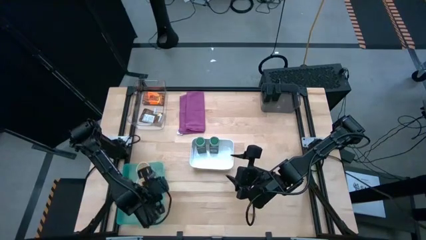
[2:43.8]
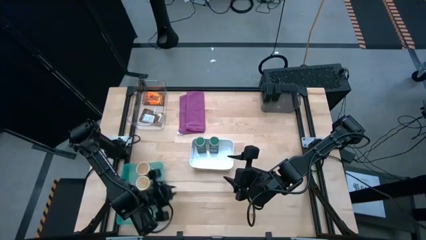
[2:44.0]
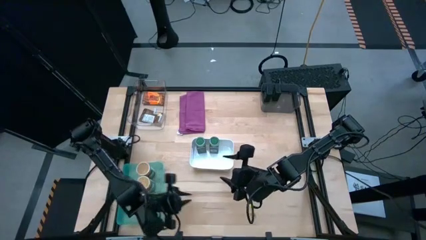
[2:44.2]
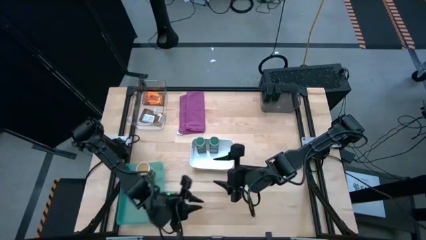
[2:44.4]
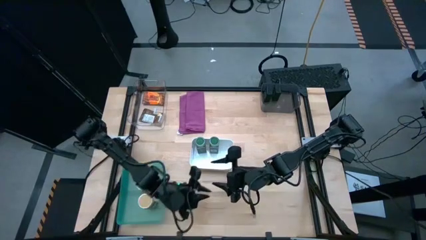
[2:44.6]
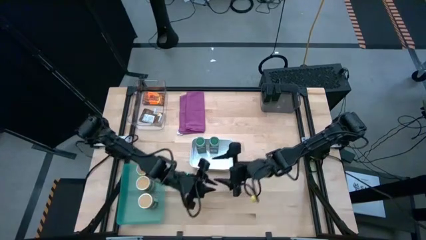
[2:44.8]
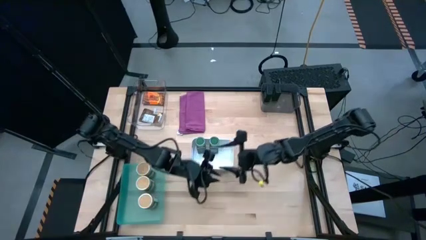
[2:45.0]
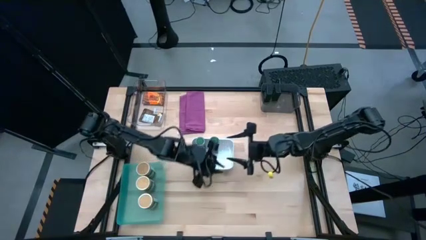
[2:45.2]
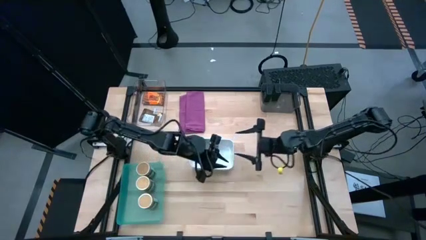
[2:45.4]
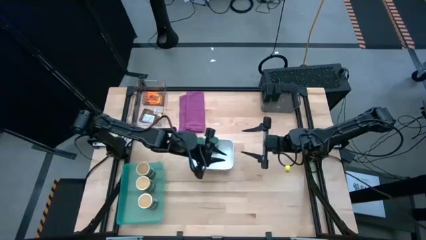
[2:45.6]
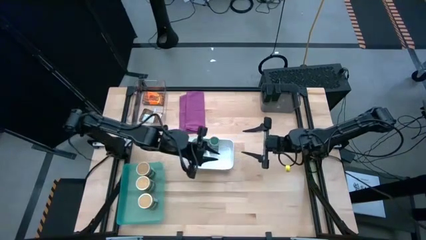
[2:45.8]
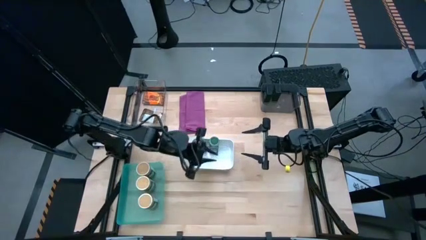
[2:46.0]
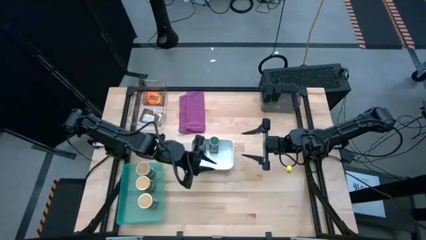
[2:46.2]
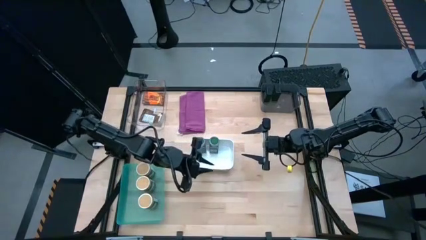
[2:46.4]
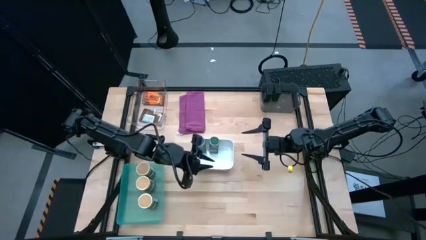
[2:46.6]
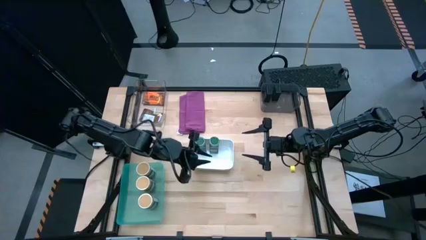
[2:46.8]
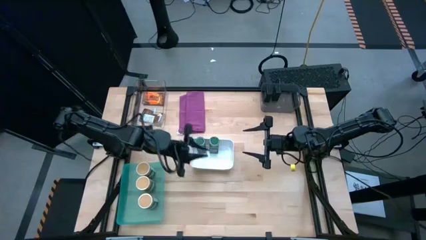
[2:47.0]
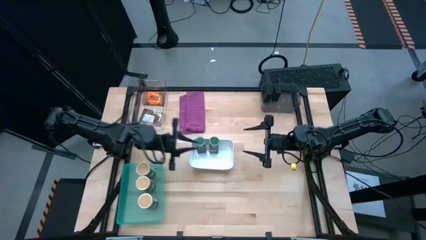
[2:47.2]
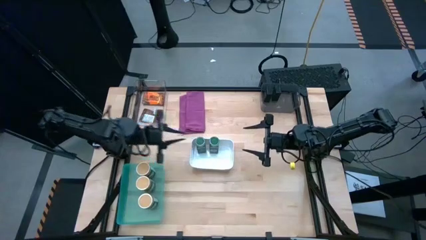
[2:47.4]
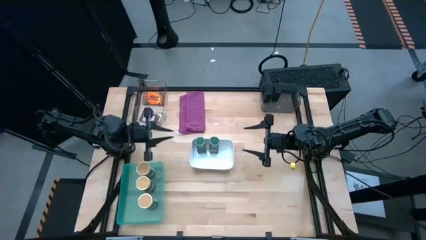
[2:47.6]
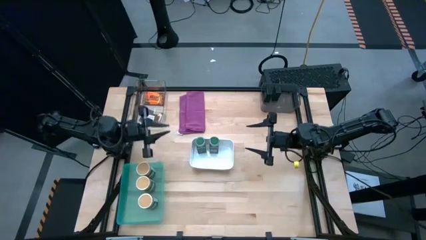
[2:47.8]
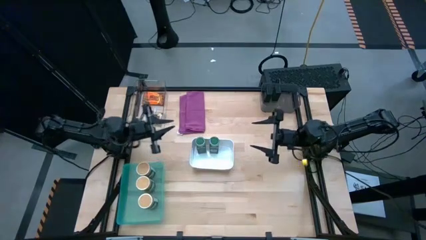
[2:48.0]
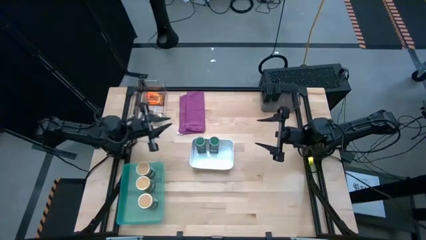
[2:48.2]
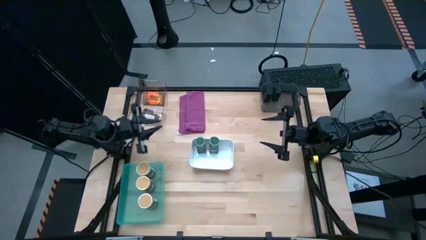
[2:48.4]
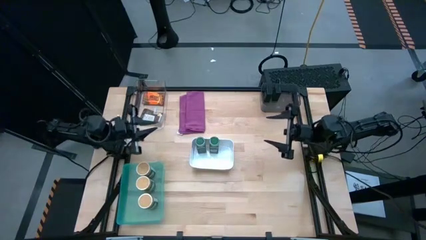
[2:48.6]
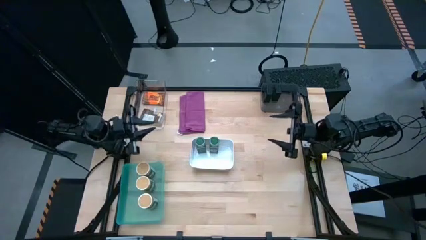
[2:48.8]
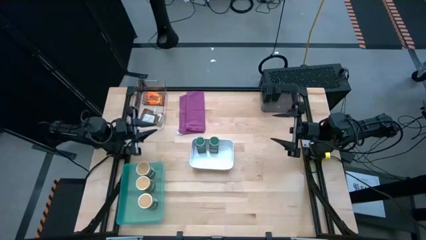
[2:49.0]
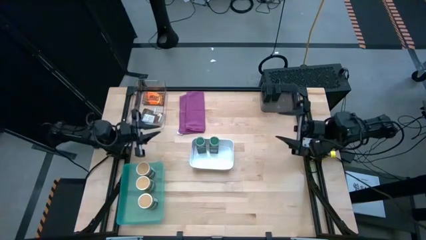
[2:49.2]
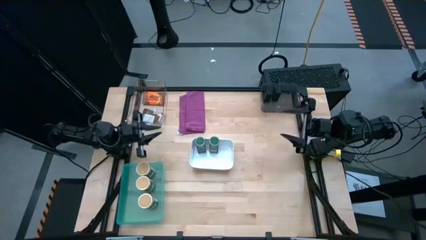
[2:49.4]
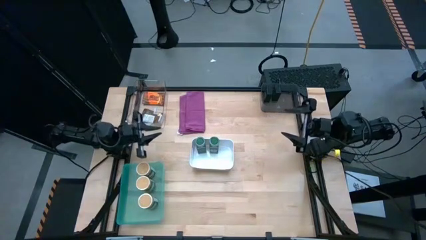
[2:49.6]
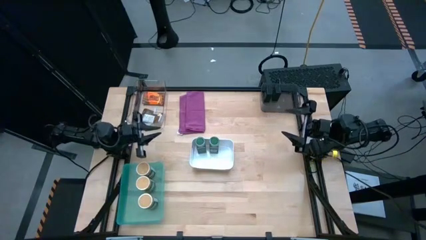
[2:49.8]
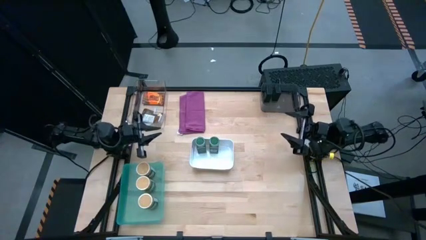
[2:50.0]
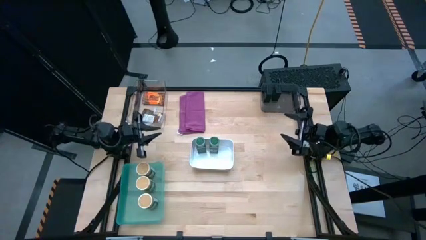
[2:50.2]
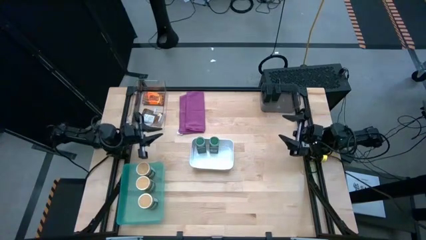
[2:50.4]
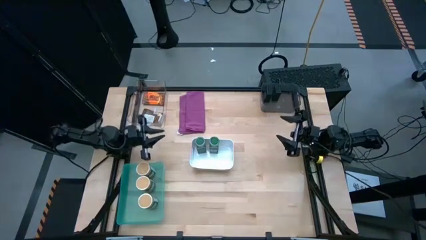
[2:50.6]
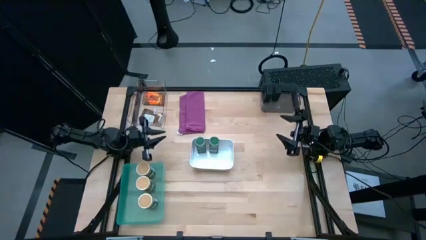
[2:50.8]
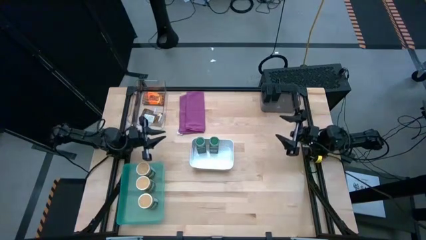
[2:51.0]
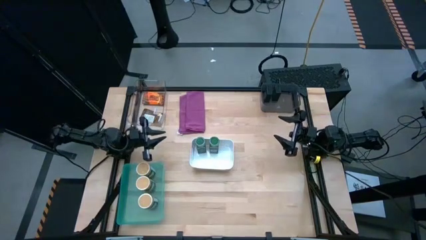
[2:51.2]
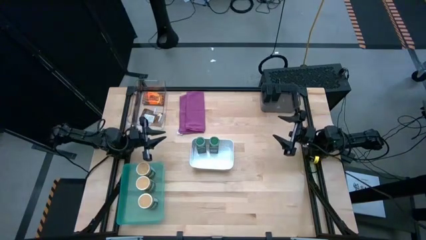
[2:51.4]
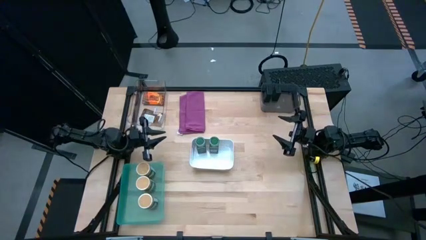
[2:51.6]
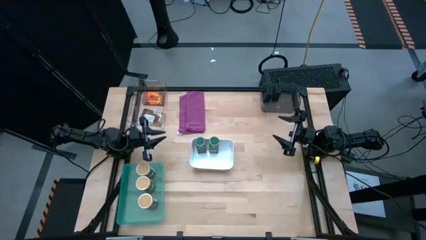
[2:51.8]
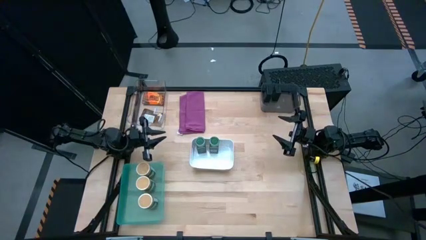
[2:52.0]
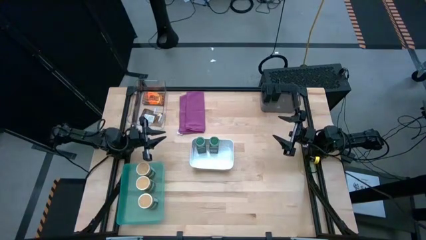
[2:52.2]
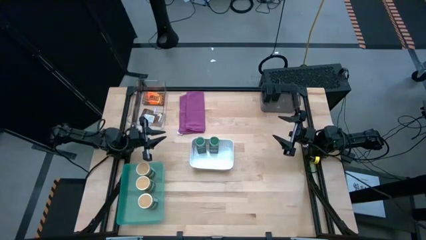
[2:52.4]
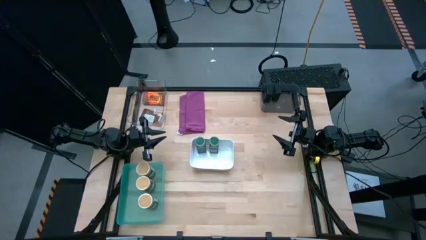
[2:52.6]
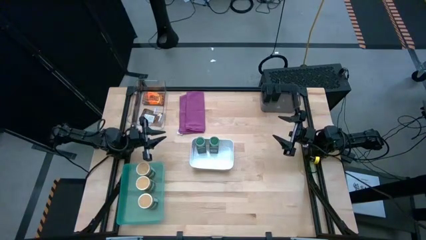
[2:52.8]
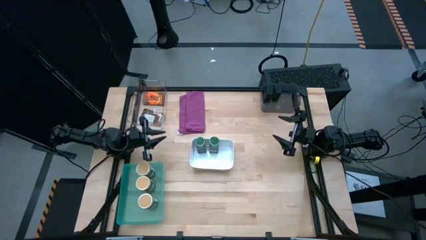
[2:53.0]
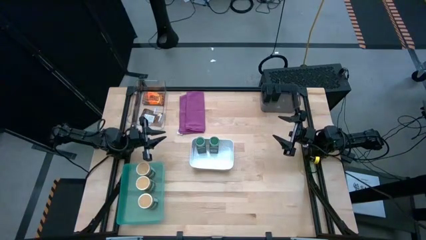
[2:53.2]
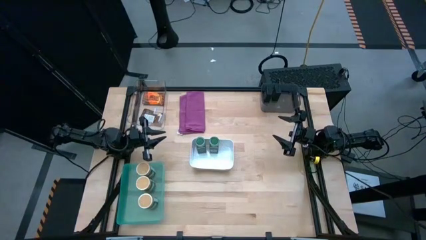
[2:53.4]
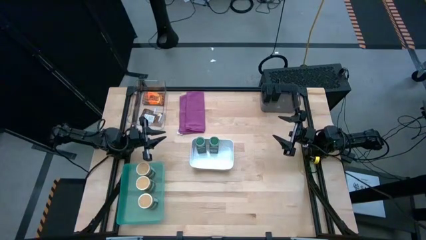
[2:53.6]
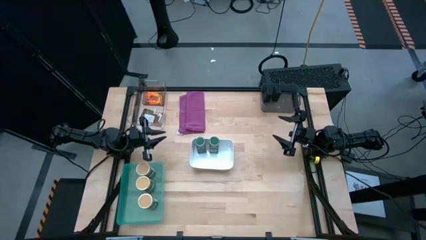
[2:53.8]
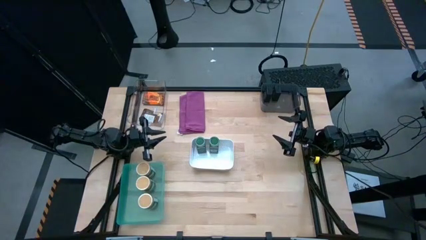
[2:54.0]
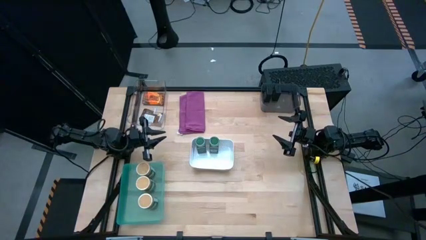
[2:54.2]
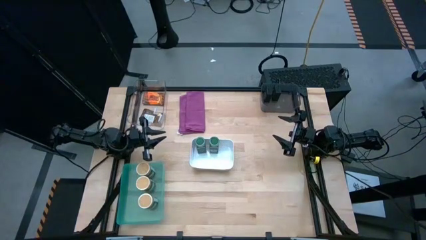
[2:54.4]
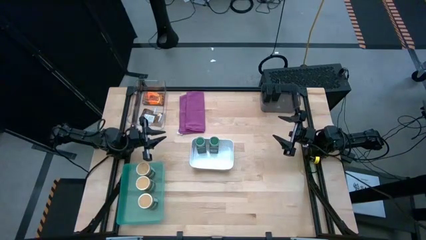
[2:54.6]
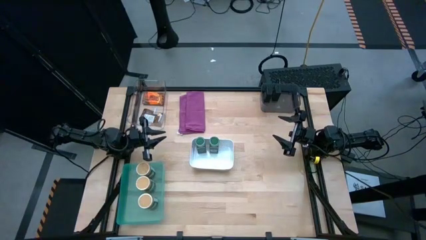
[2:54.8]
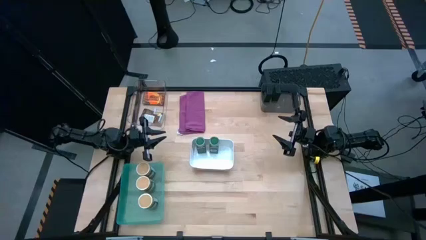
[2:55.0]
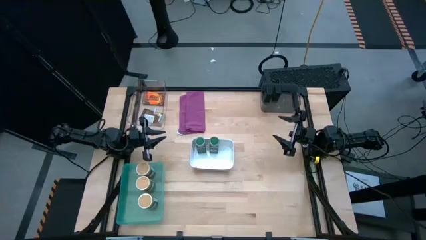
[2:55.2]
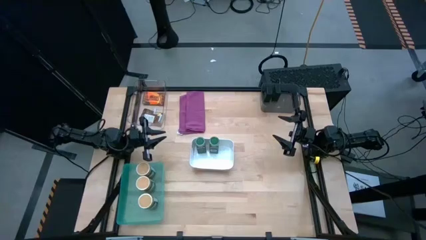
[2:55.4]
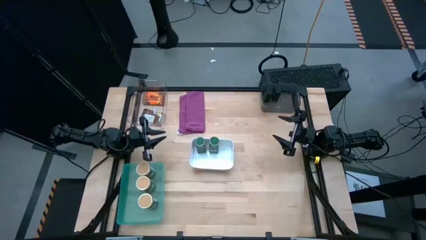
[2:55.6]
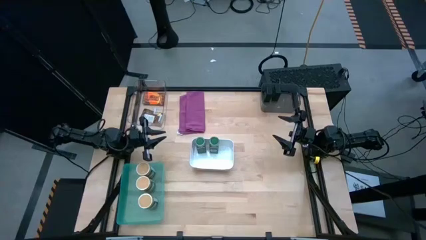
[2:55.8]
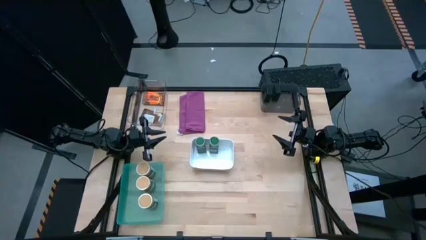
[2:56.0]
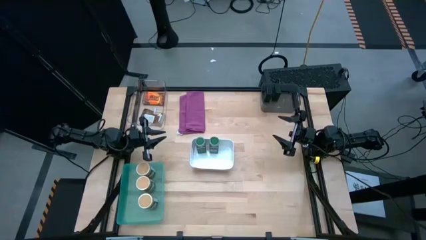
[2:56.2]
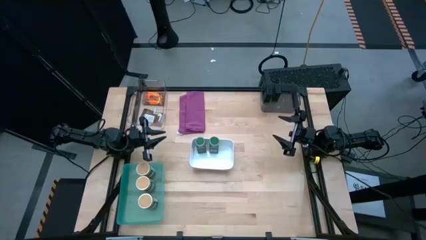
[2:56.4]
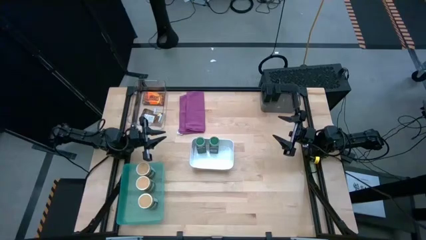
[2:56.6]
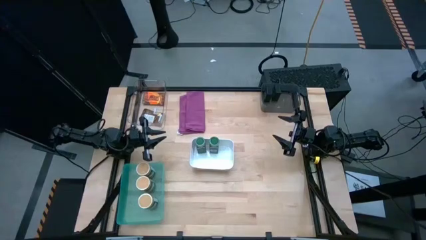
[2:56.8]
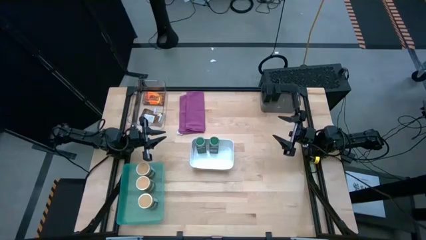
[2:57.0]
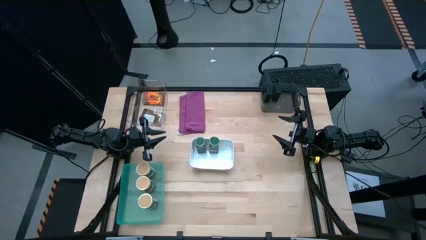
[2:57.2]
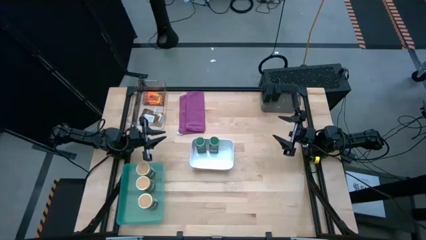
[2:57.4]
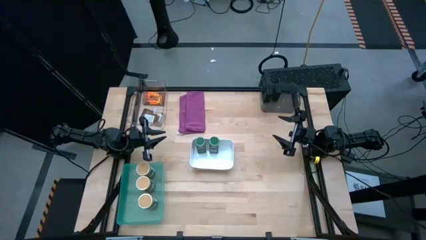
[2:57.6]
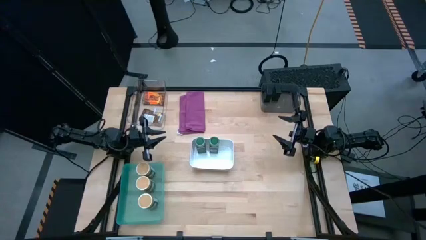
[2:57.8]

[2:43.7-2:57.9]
Task: Sort spices by type
Return to Home Position
